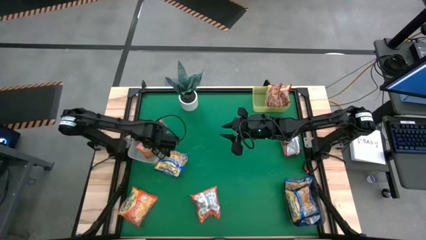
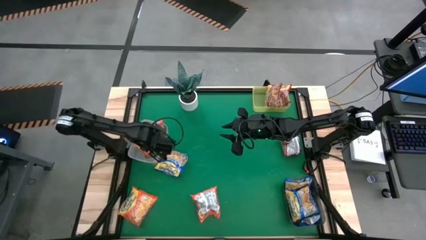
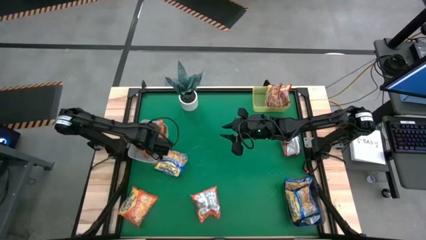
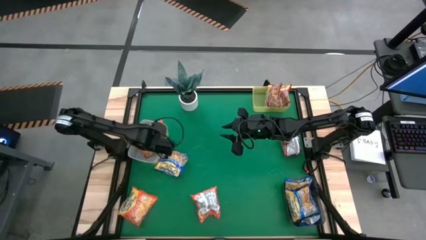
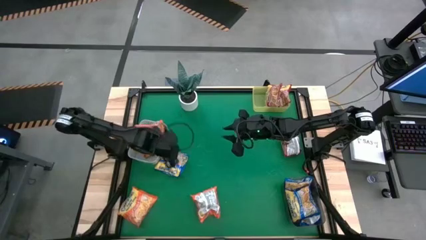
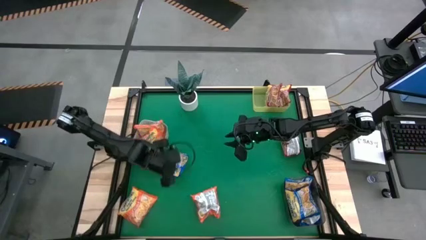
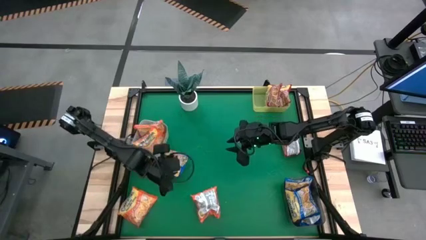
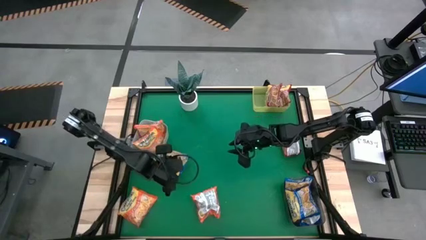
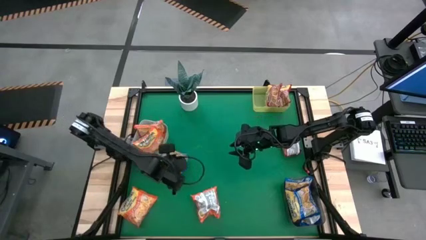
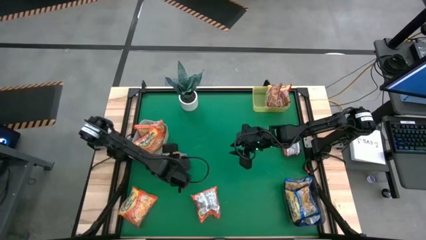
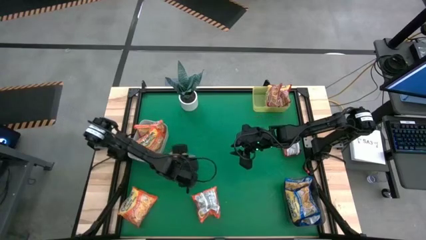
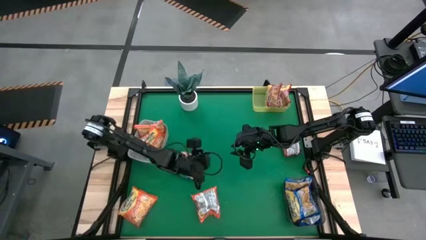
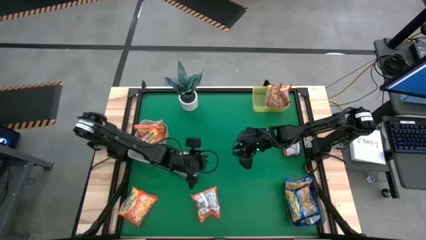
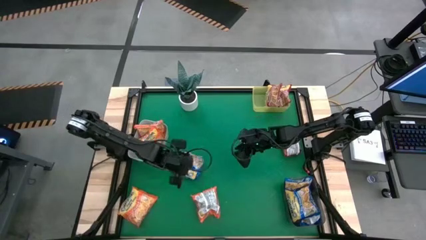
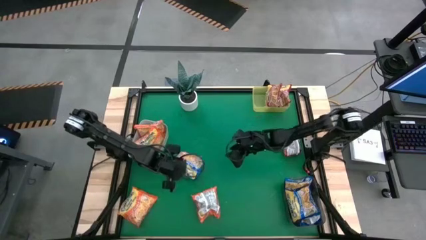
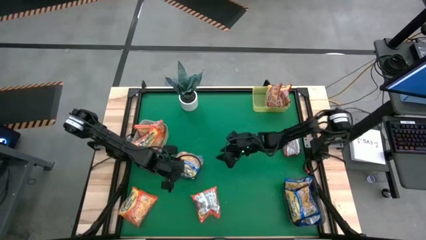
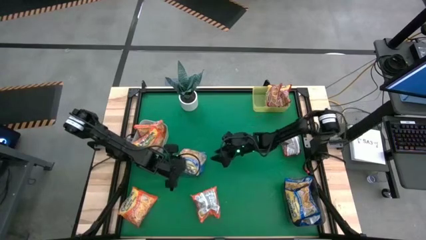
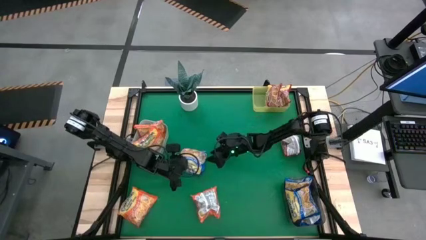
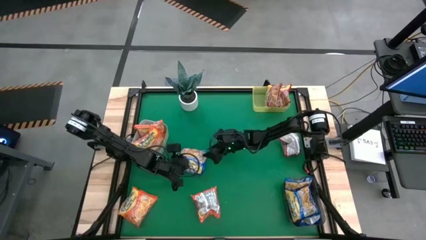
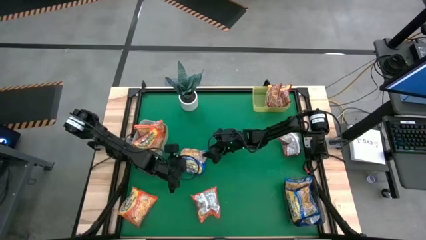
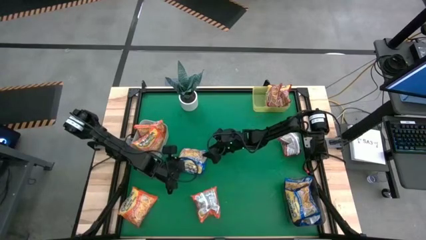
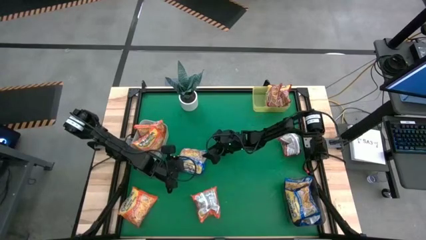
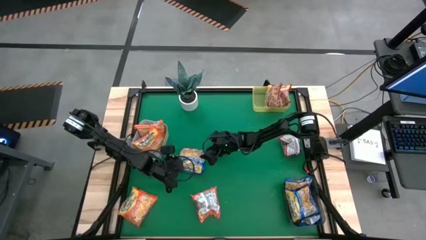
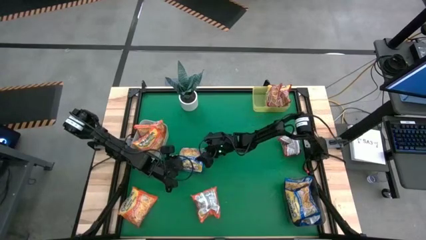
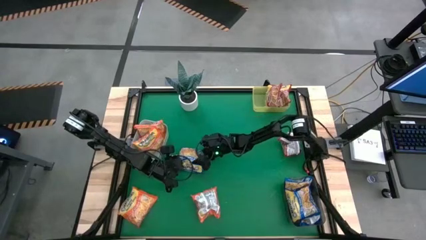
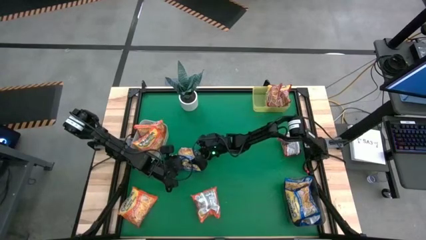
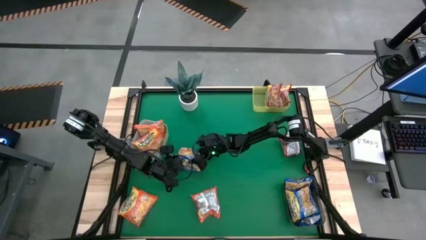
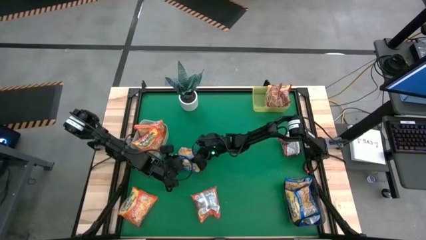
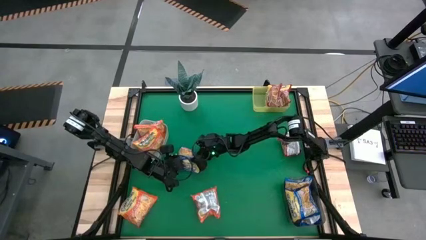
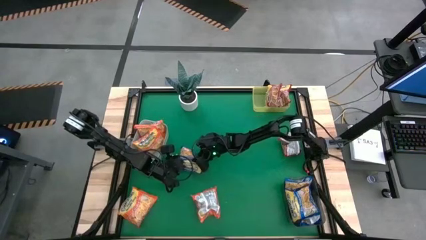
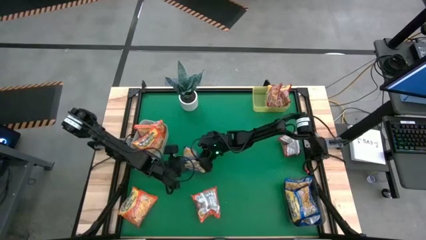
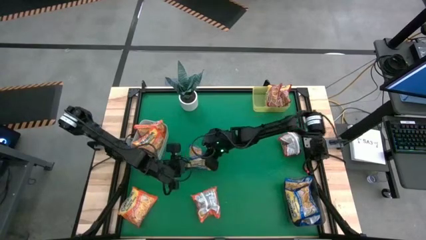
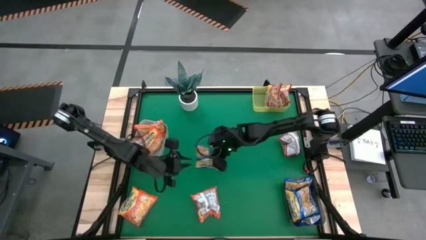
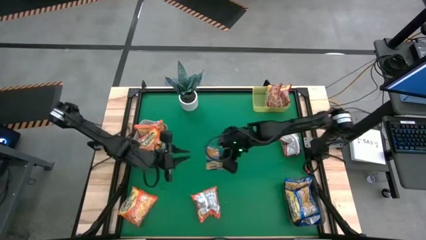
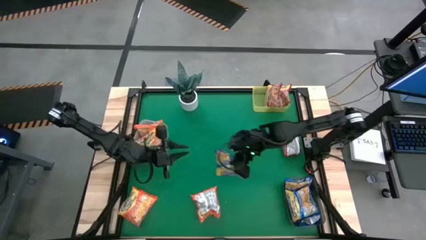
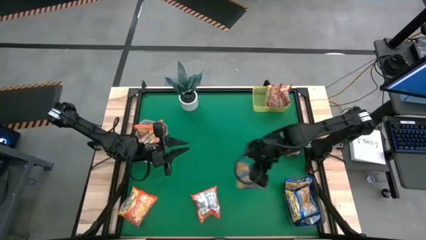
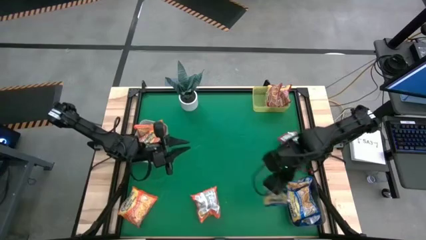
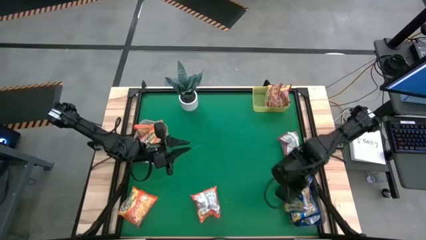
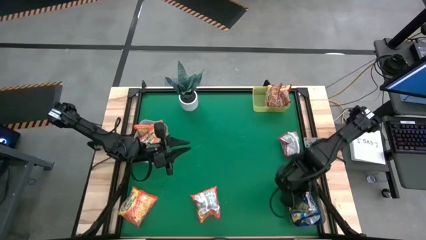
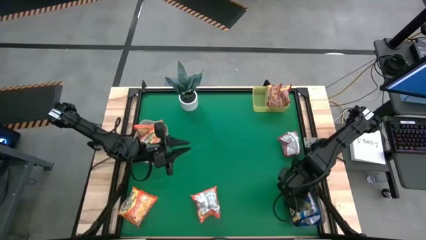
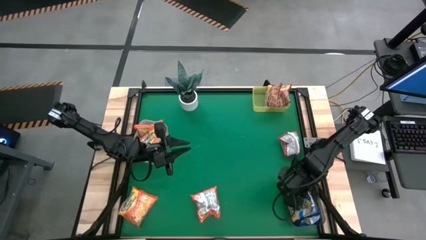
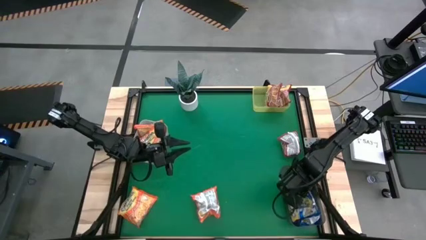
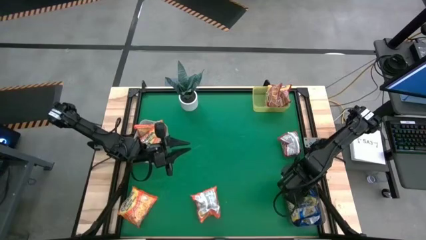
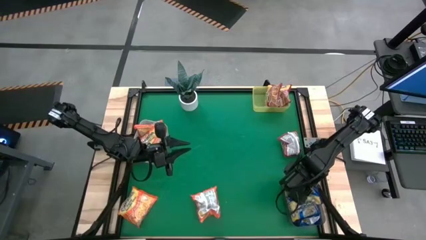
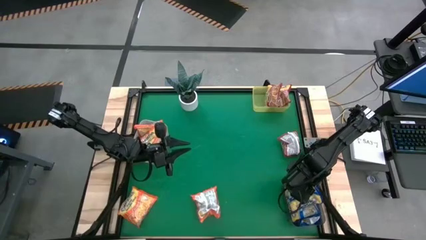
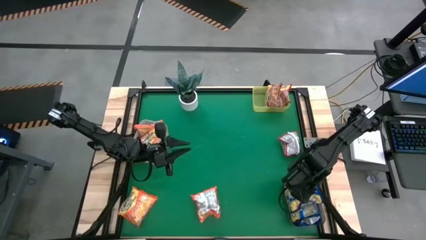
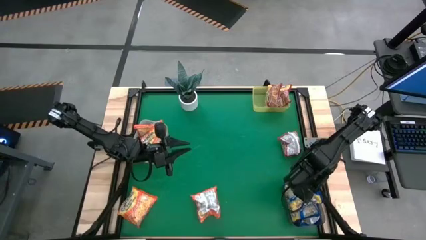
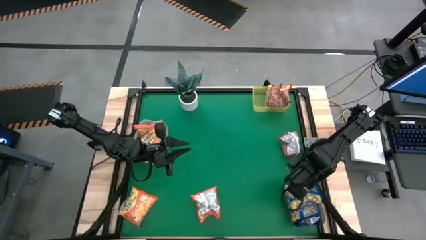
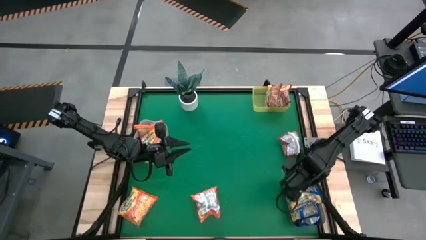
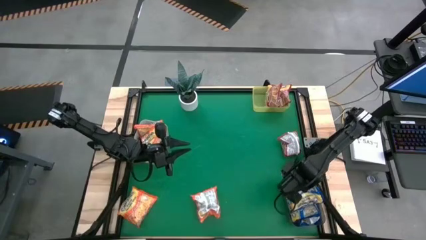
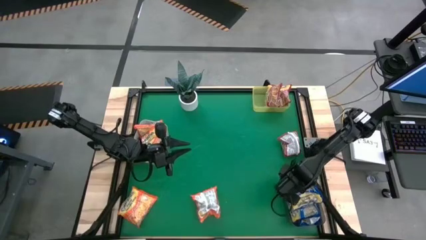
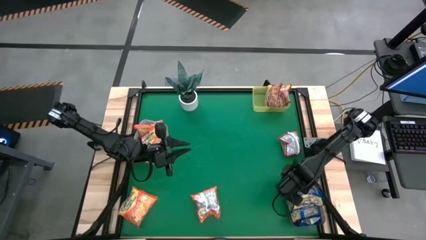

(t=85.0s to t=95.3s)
Task: Sort Maruchan noodles
Put the blue noodle pack into the black bin

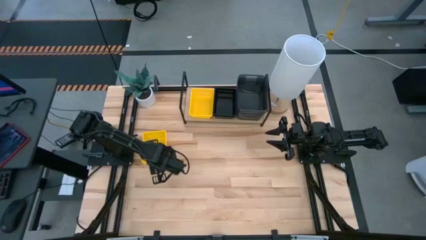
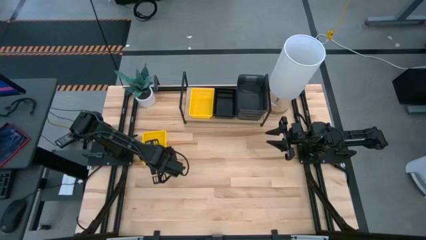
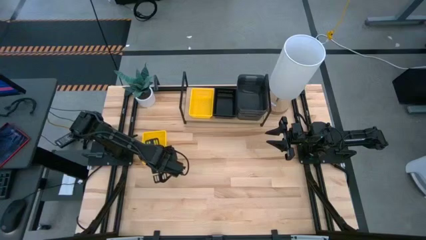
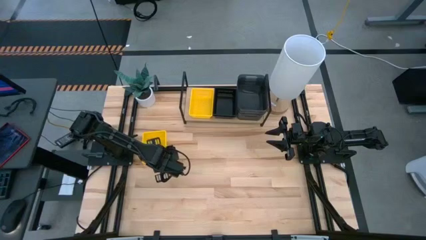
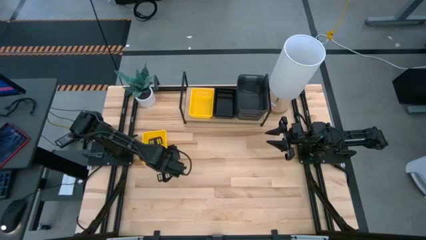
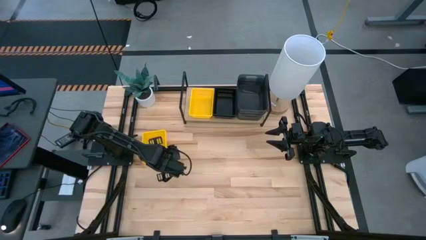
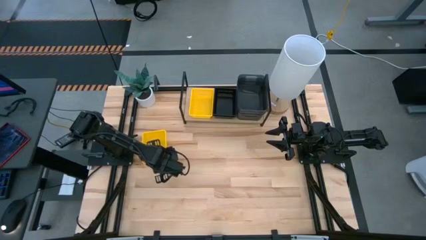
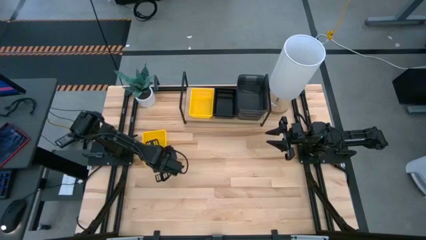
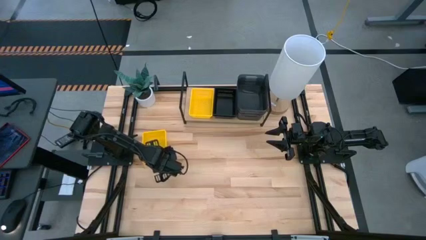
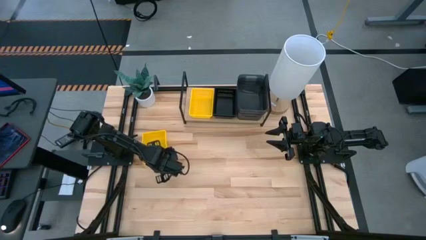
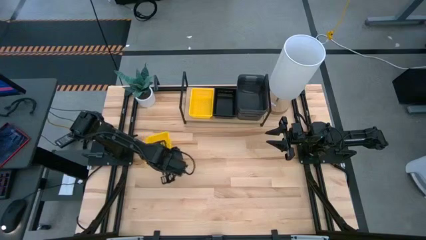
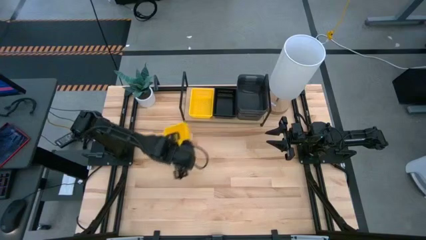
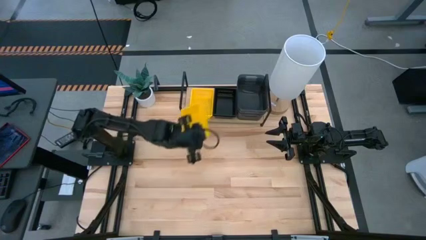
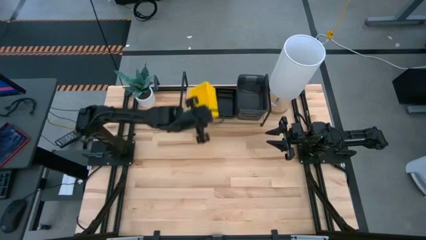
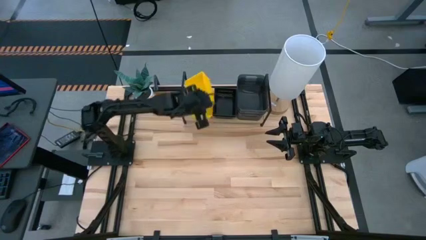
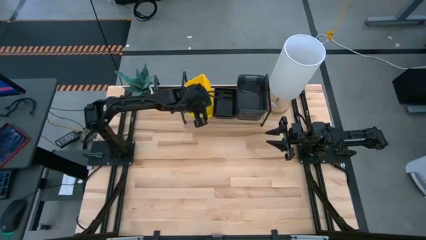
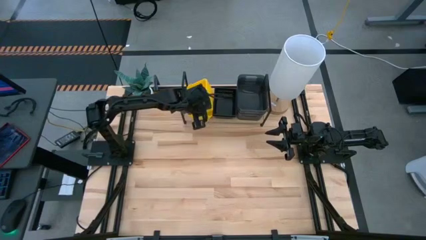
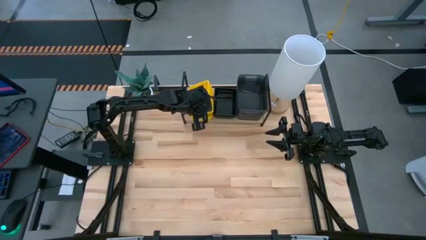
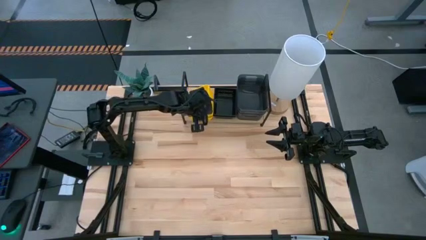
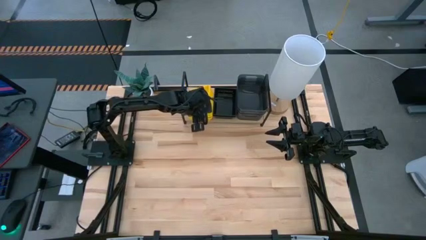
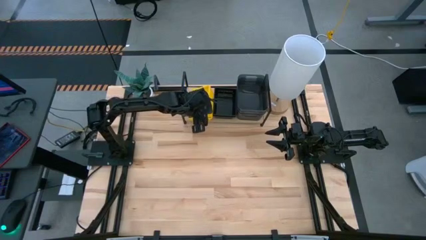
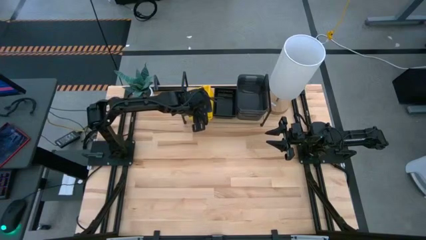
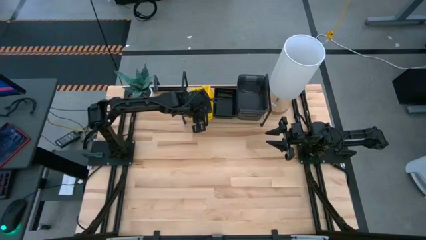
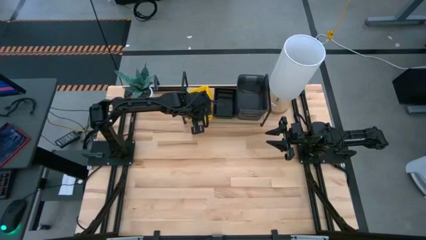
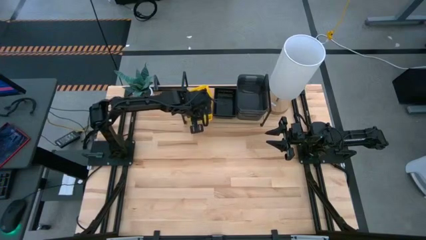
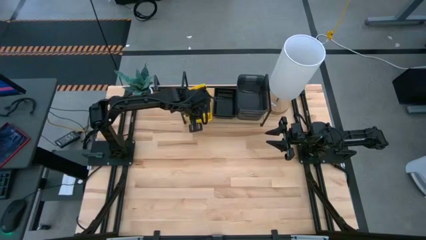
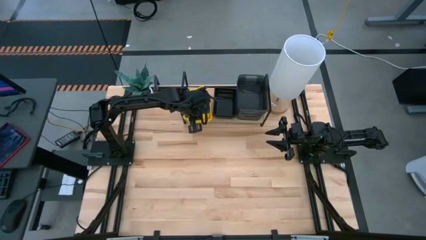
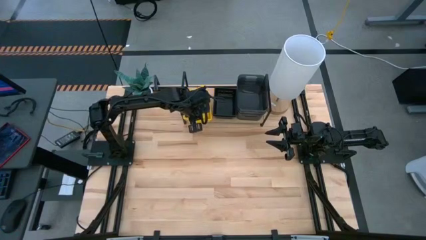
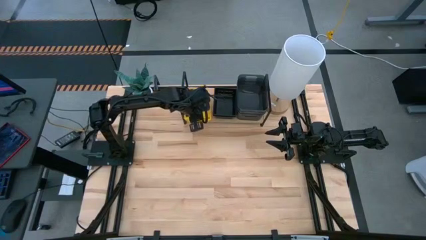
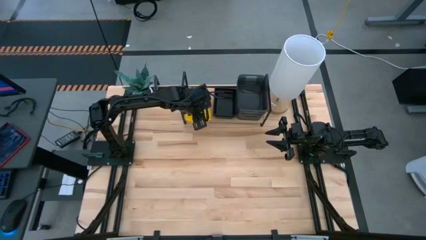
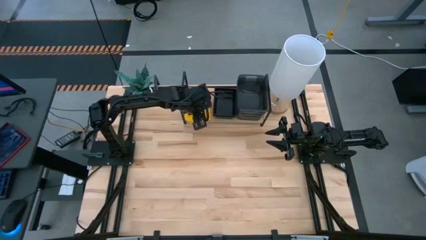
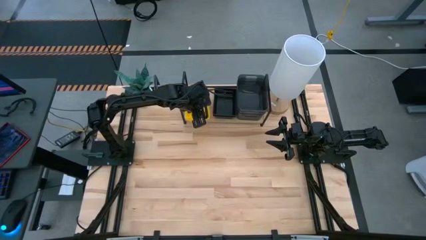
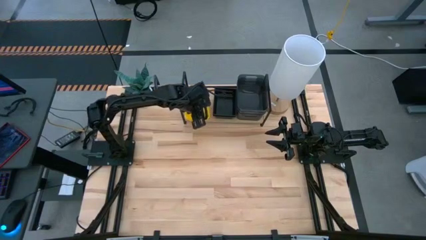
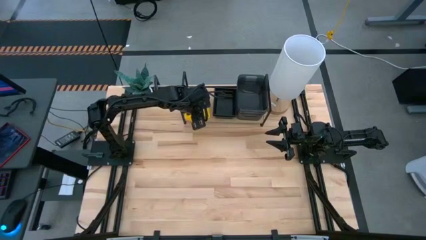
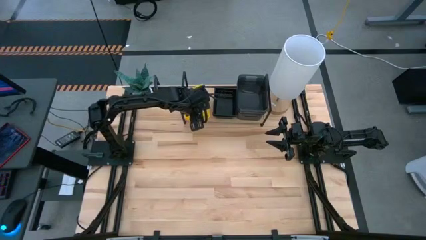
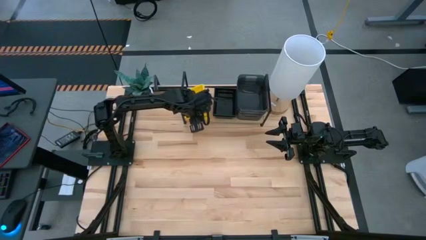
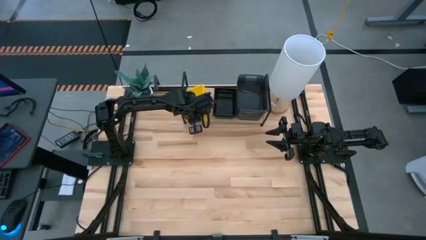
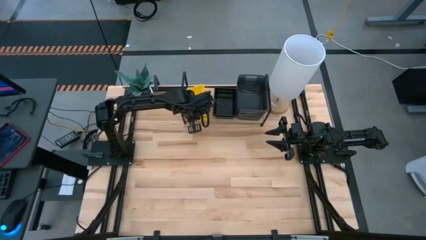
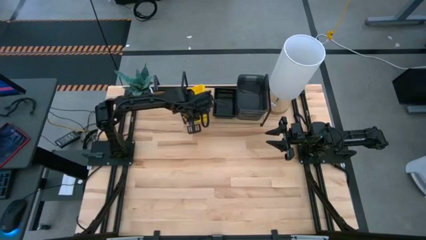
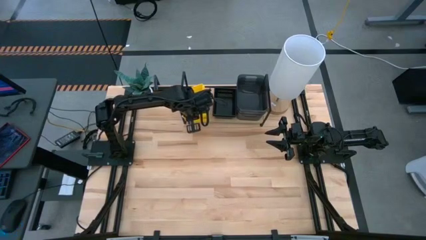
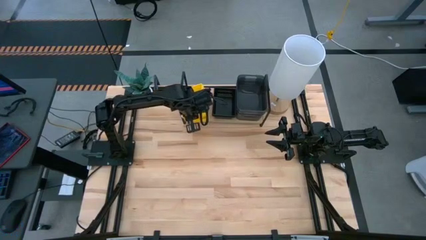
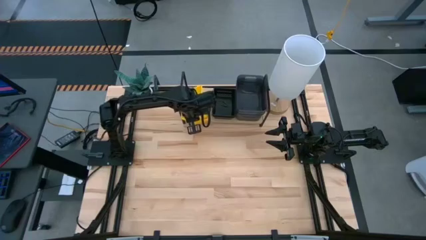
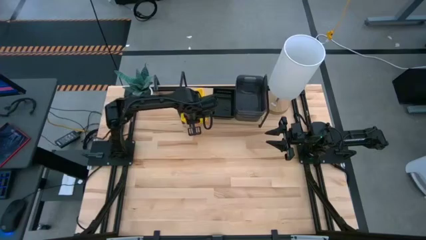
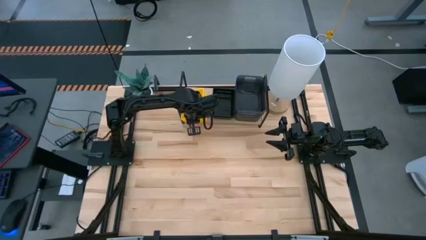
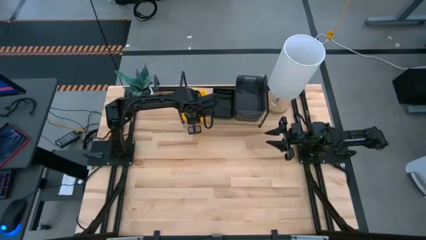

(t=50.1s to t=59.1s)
Task: Stack baskets on shelf by color
Stack the stacked yellow baskets on the yellow basket on the shelf
